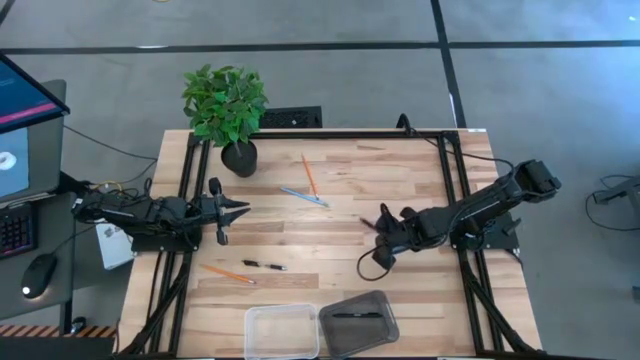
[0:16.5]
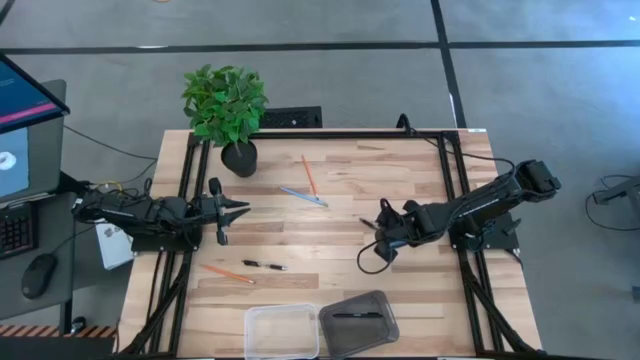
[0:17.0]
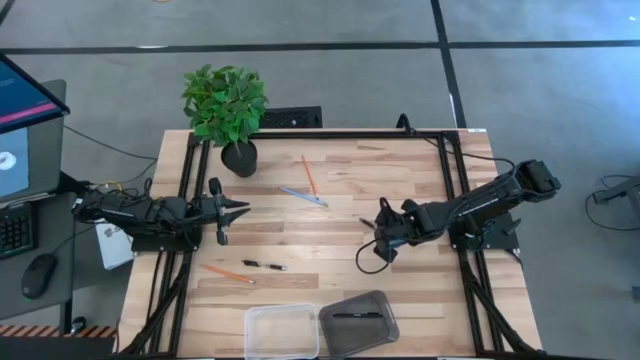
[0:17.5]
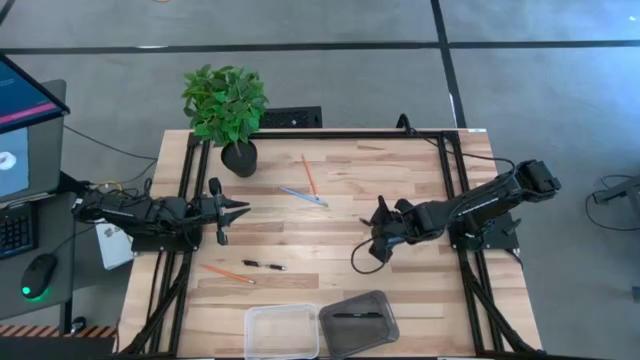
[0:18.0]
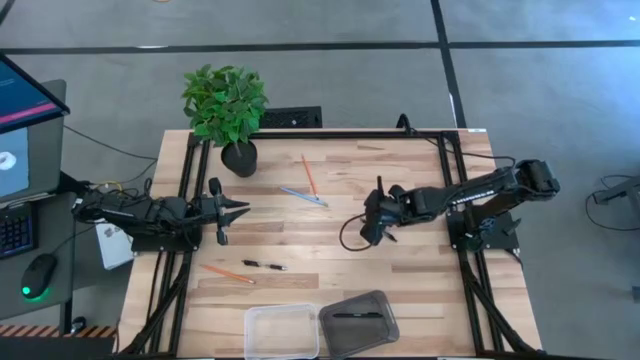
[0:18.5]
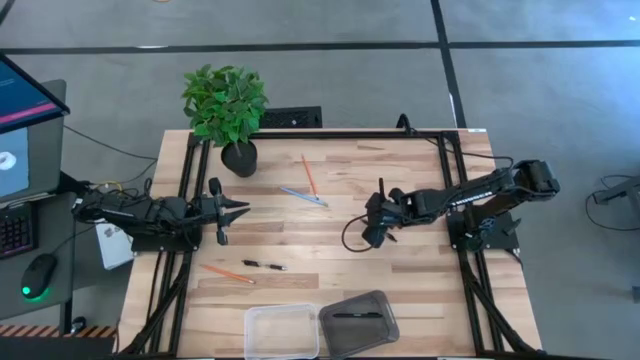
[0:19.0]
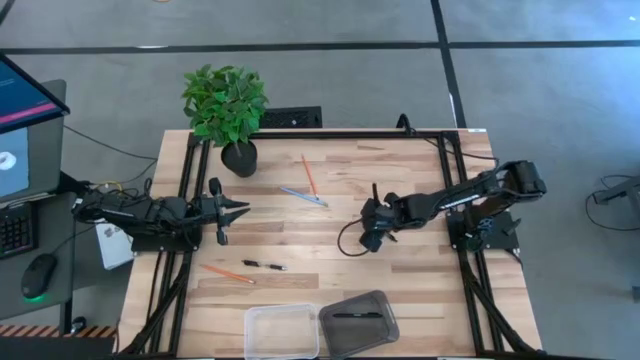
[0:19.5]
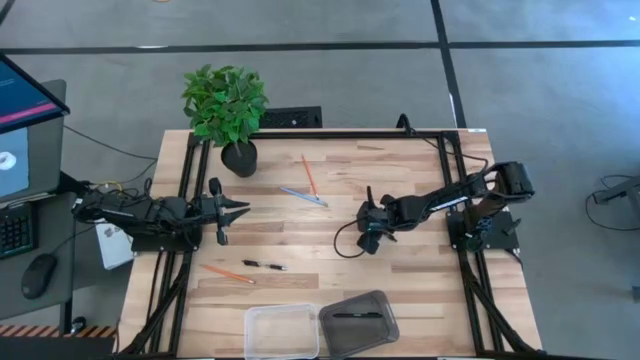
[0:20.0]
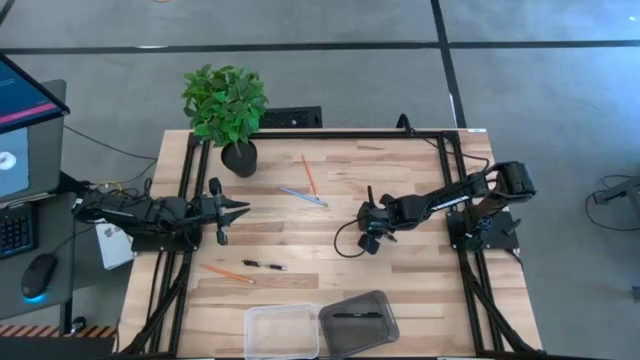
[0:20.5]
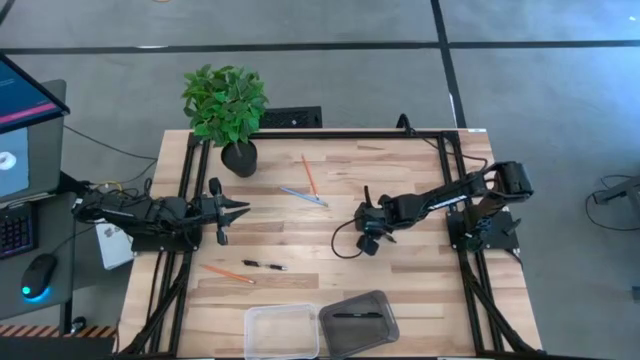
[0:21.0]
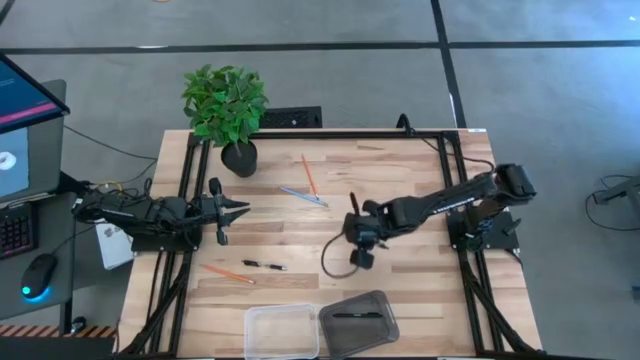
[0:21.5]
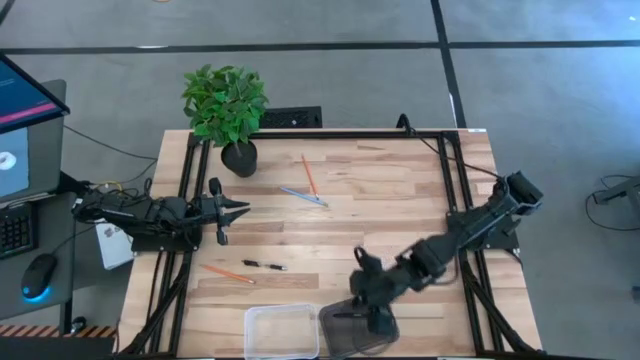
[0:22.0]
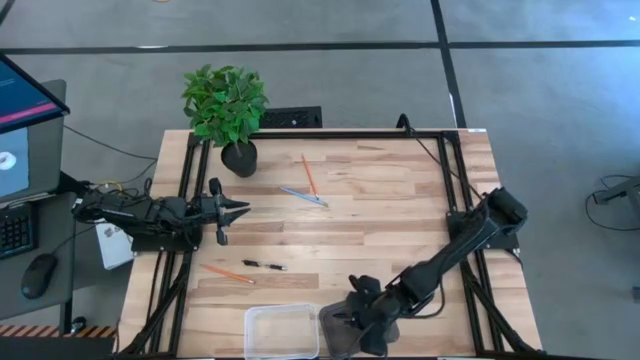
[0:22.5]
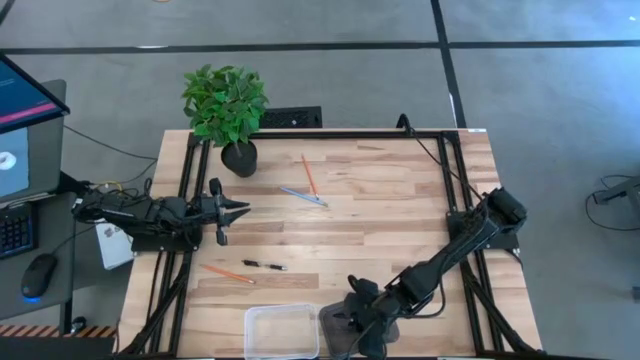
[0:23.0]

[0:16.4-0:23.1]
Task: Sort pens & pencils
Put the right black pen into the black bin

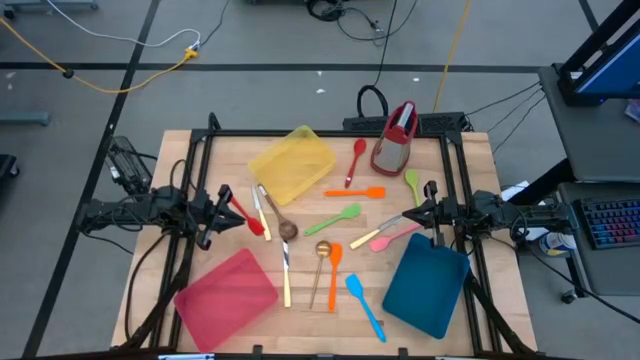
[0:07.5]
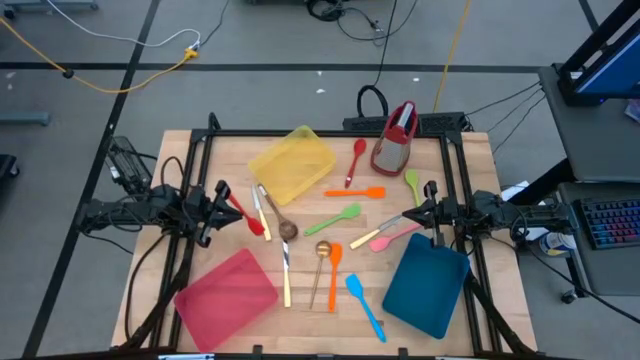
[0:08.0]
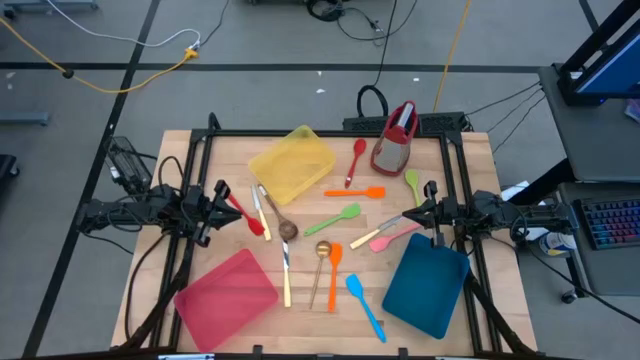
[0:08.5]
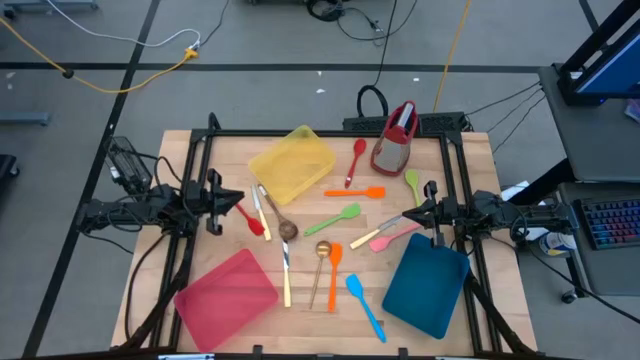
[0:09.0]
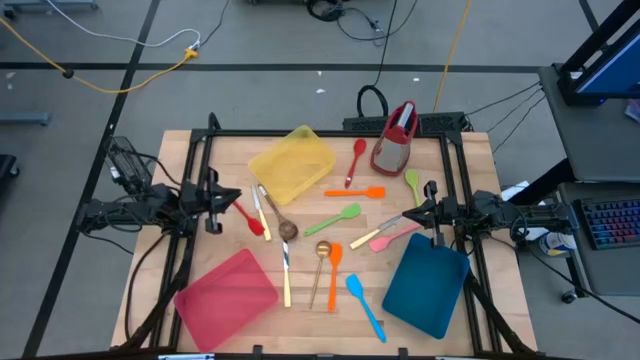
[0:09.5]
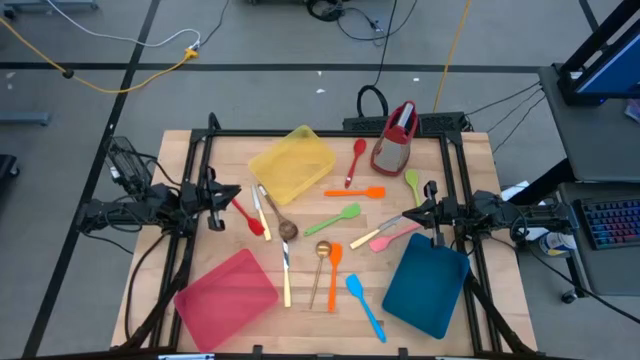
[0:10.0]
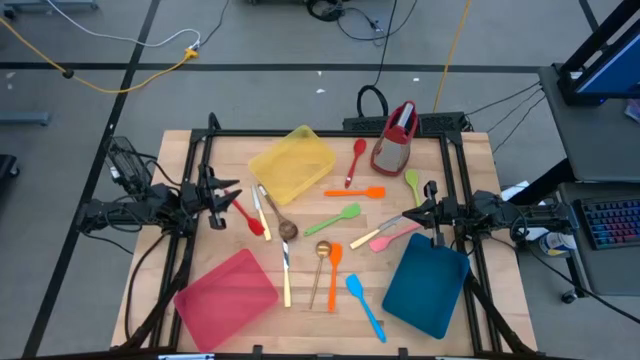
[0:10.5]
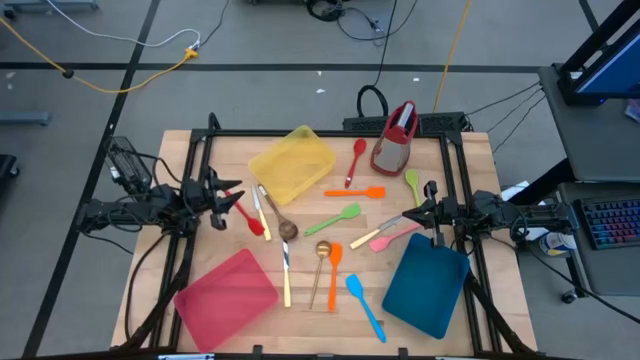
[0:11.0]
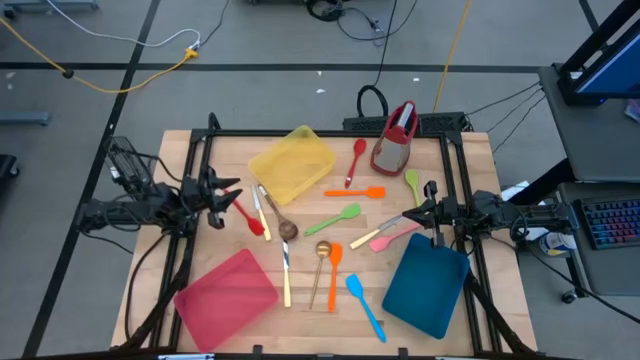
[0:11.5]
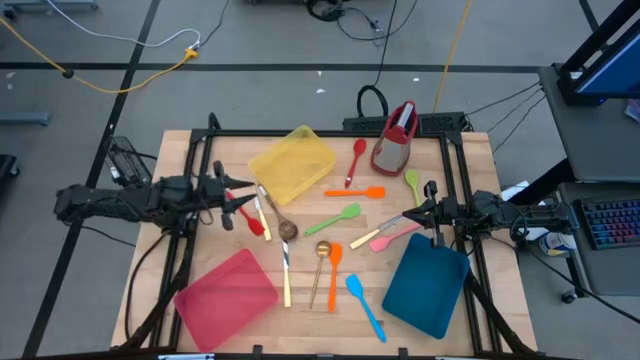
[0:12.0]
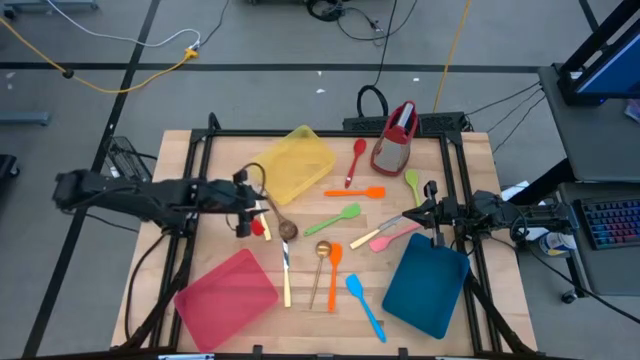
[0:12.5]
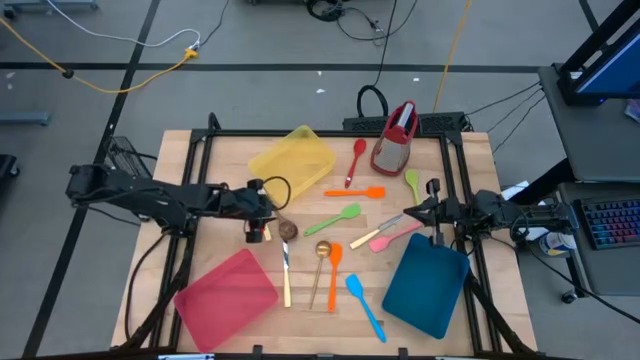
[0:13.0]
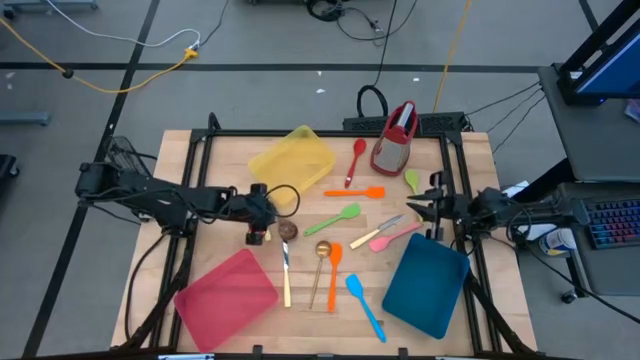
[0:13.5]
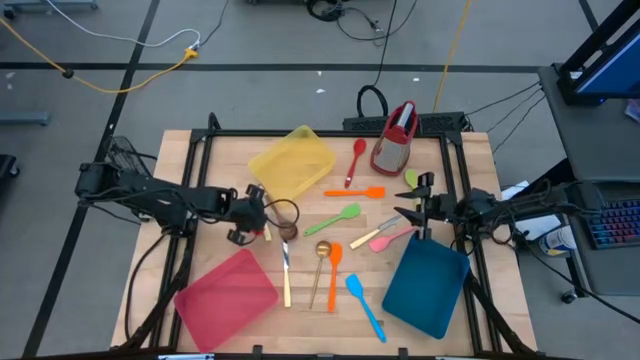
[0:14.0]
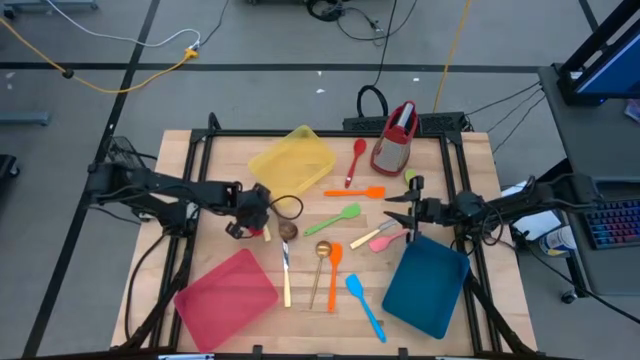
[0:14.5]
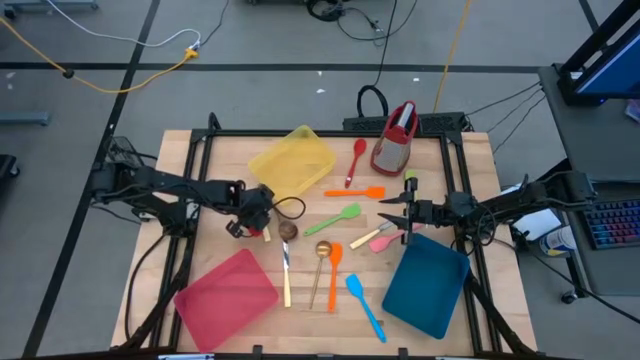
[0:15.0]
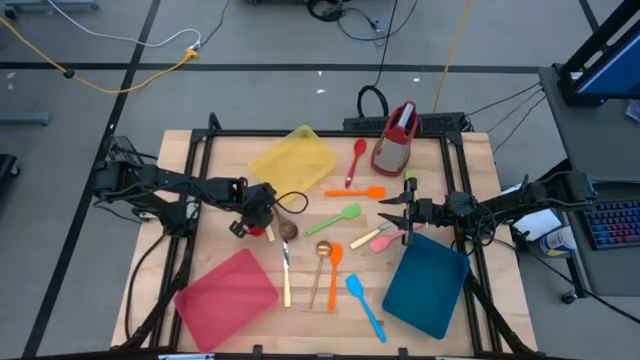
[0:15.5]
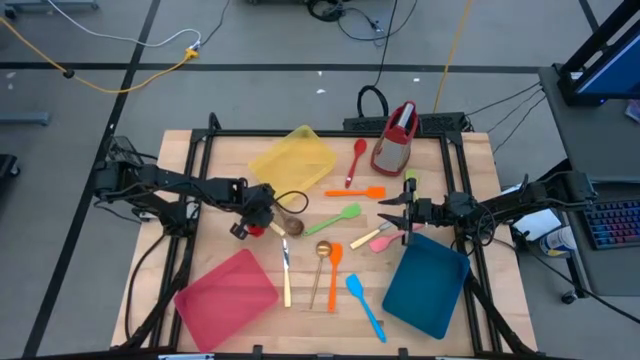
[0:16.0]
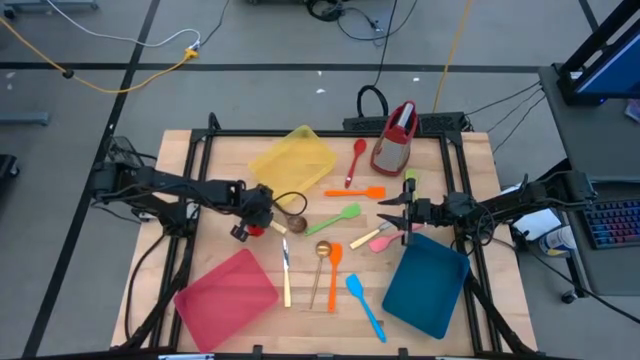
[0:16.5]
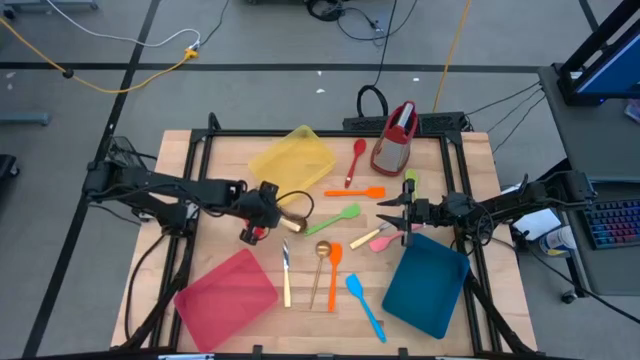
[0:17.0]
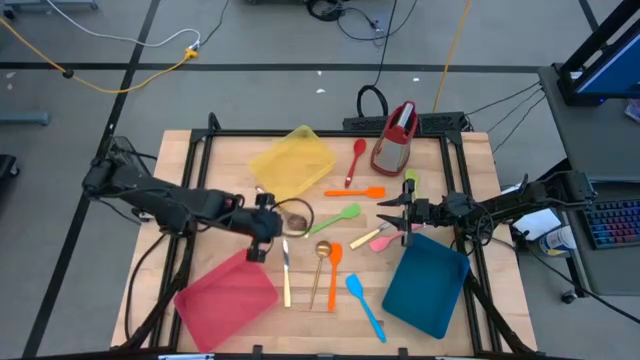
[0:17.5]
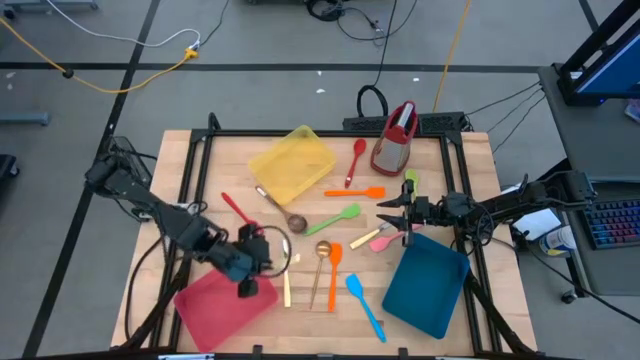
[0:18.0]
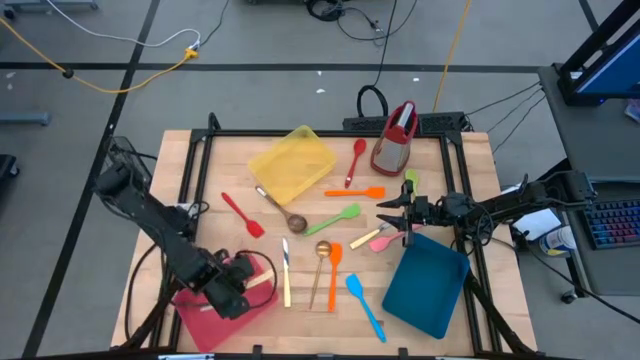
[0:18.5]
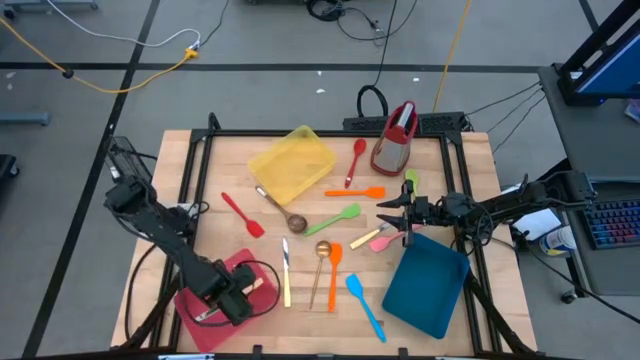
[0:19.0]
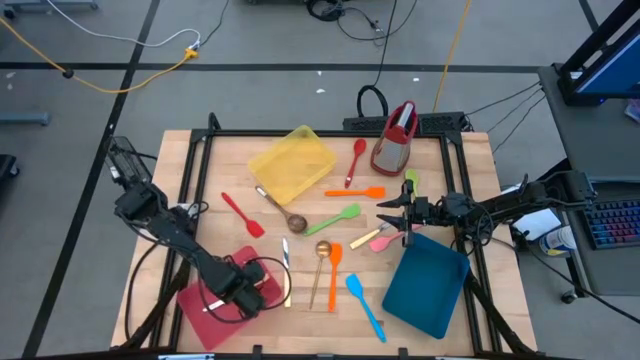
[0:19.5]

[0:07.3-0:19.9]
Task: Pick & Place Kitchen Items
Put the left yellow table knife into the pink bin

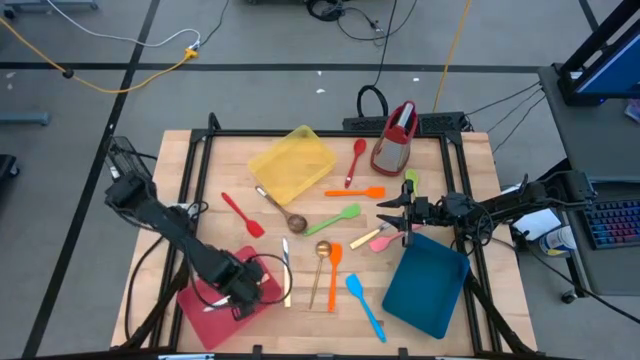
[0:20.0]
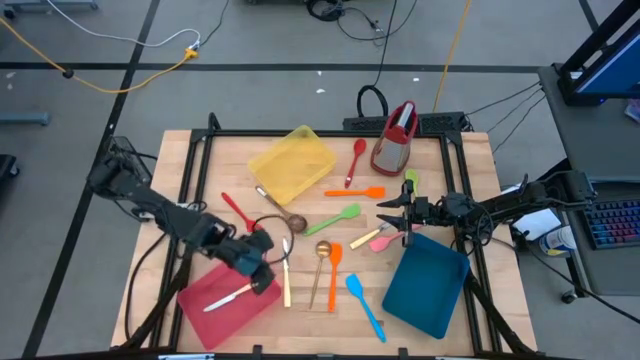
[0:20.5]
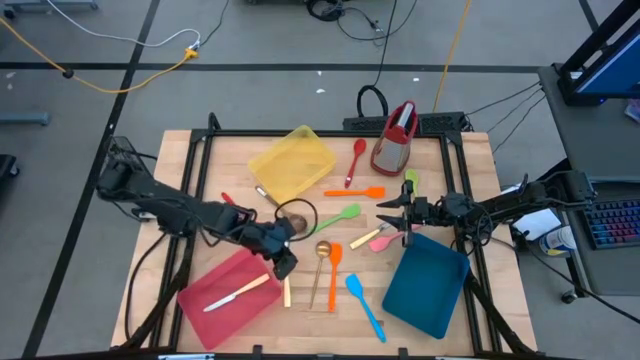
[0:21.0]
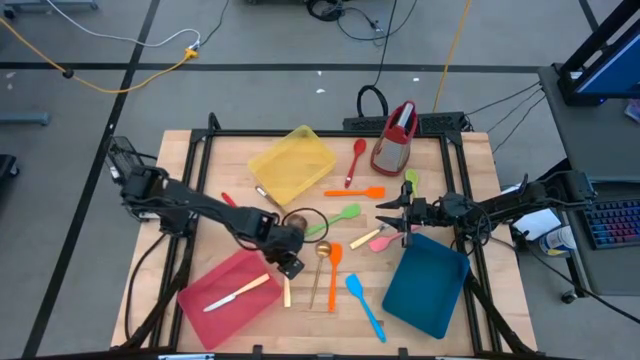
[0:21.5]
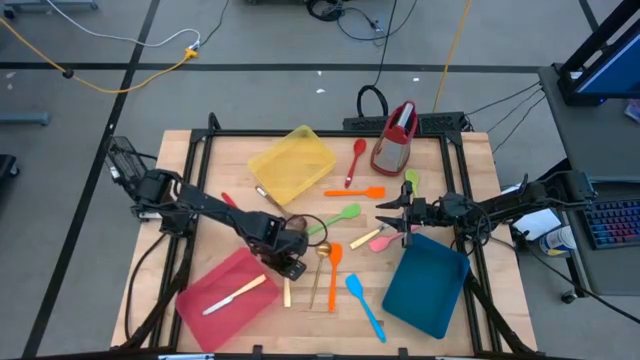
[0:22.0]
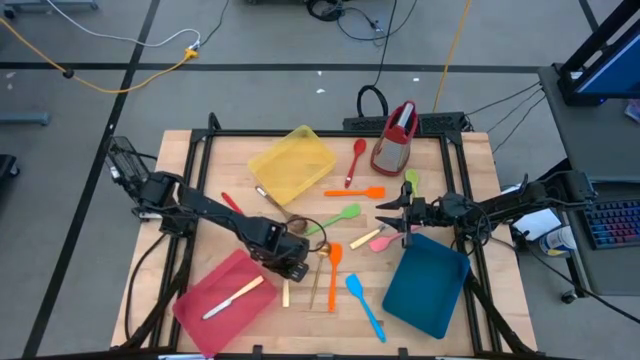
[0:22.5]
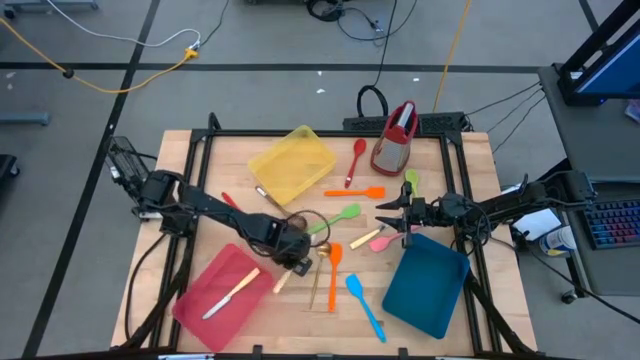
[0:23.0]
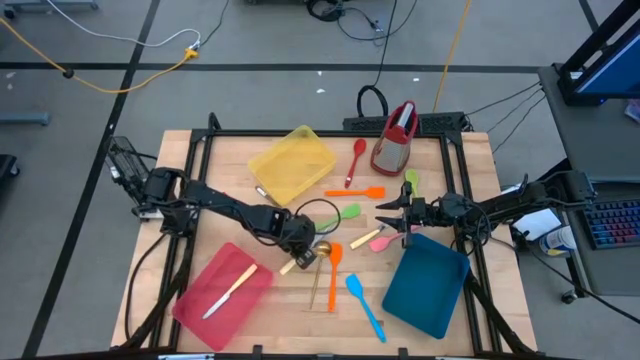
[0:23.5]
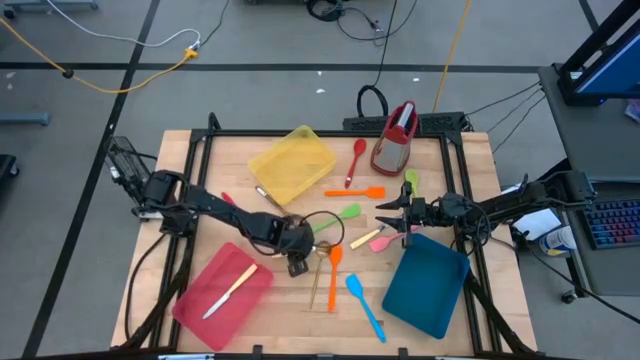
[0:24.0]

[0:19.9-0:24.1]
Put the bottom yellow table knife into the pink bin
